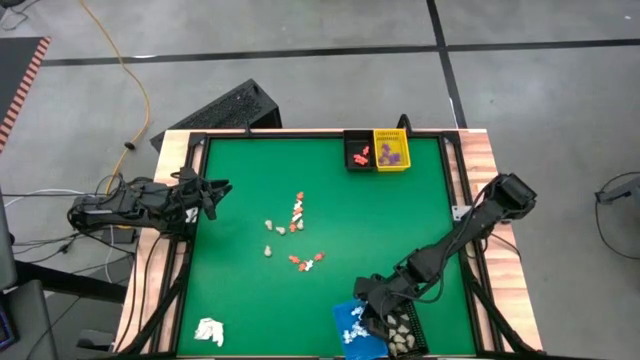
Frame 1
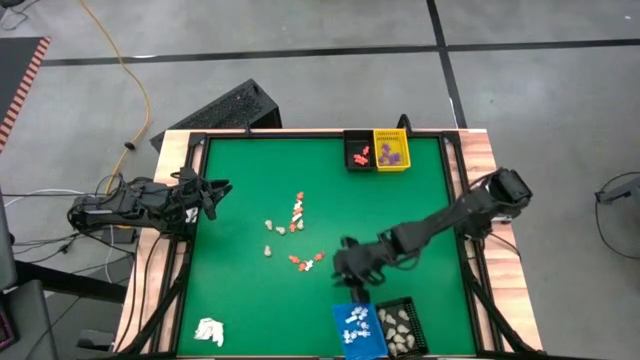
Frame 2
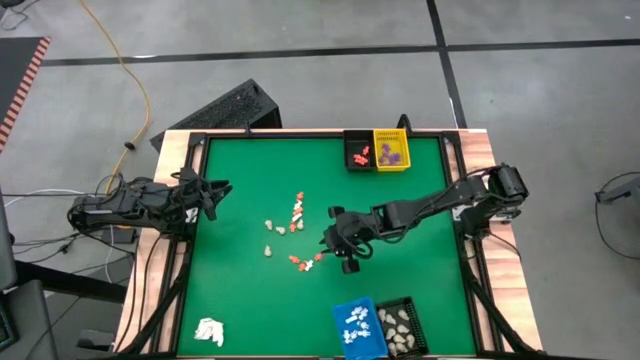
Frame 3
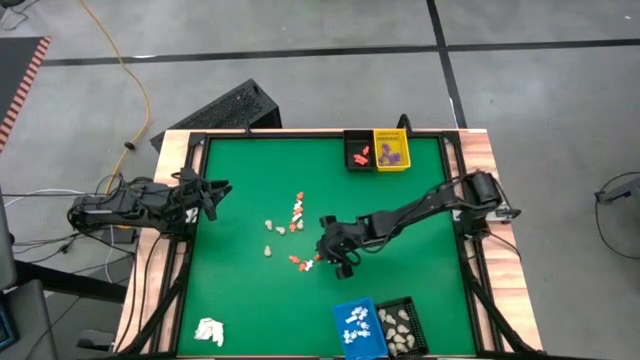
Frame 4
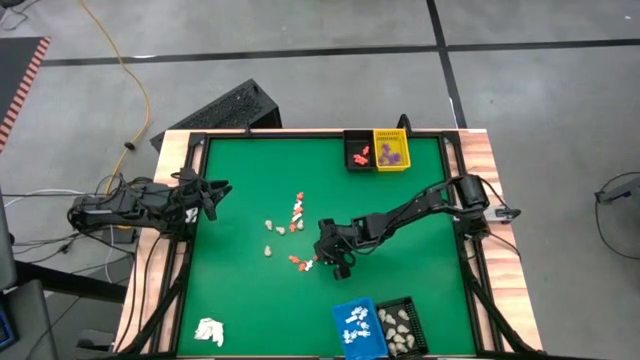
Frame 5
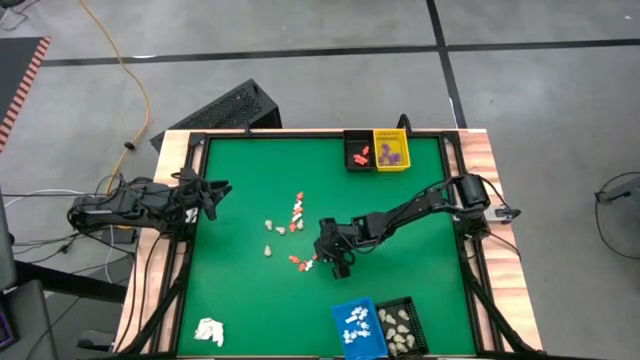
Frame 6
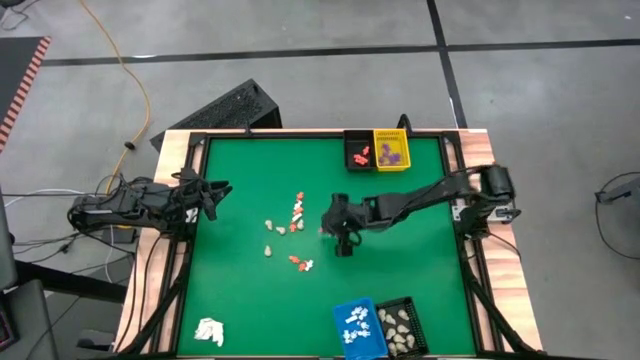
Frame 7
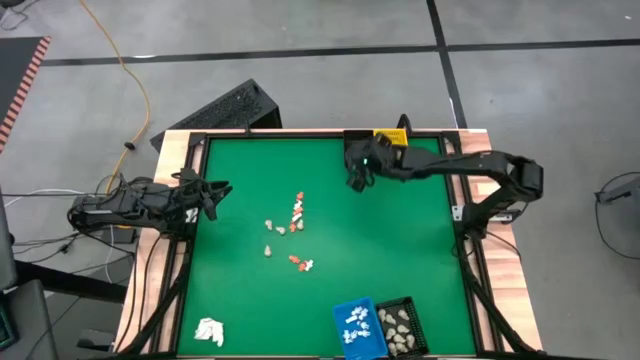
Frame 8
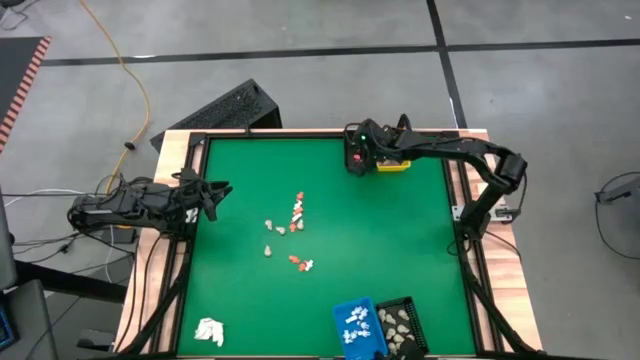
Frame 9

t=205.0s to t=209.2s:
Task: Sort Halloween decoration
Put the orange skeleton toy into the top black basket

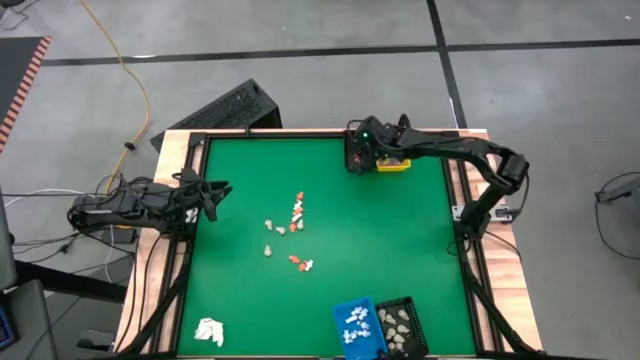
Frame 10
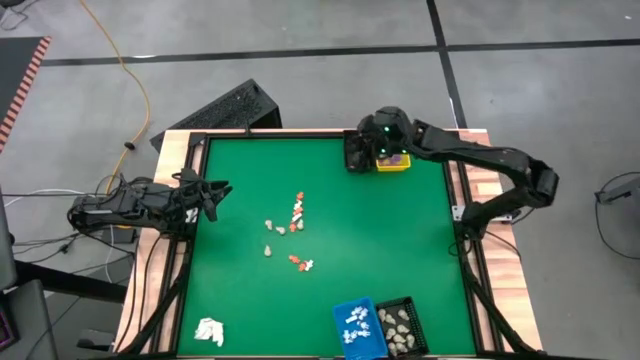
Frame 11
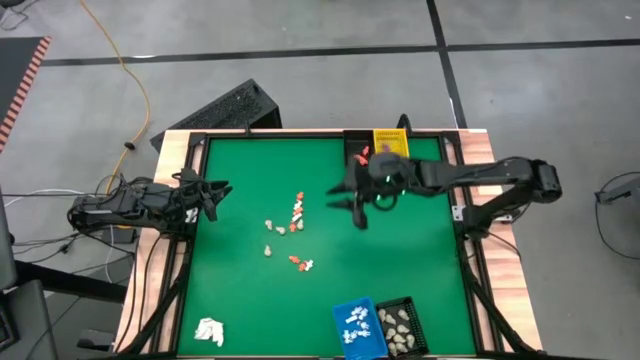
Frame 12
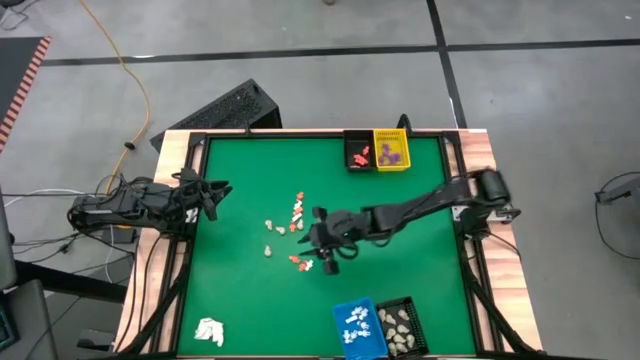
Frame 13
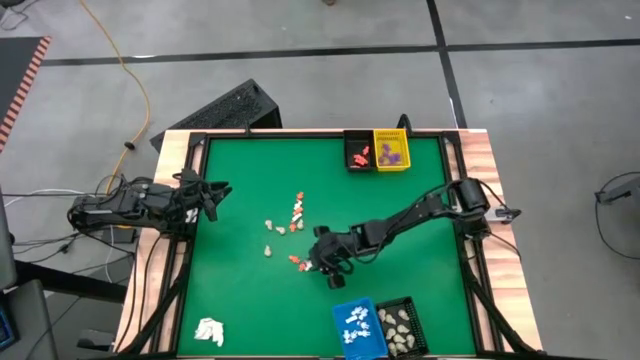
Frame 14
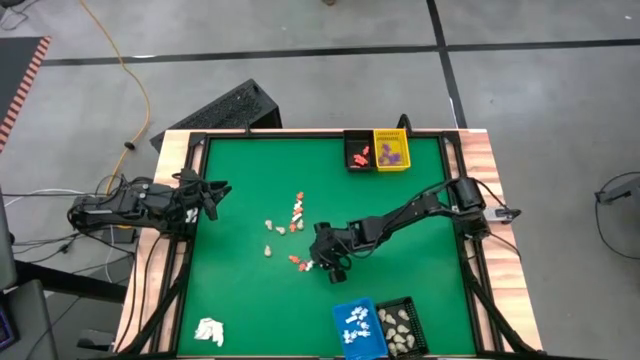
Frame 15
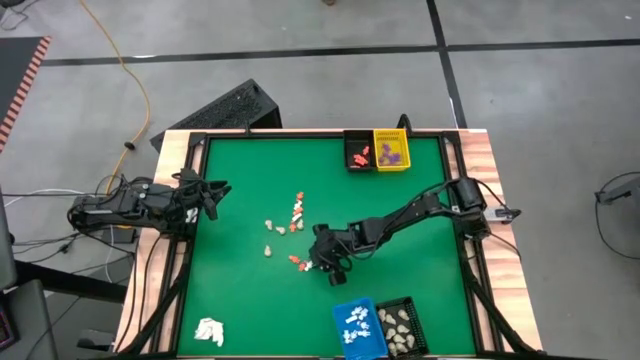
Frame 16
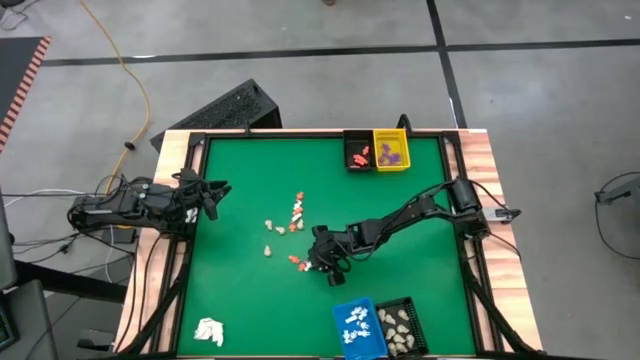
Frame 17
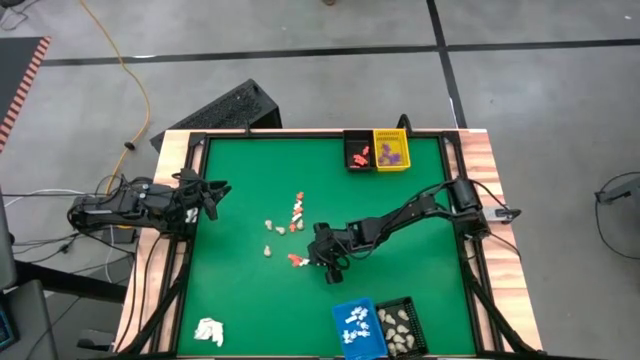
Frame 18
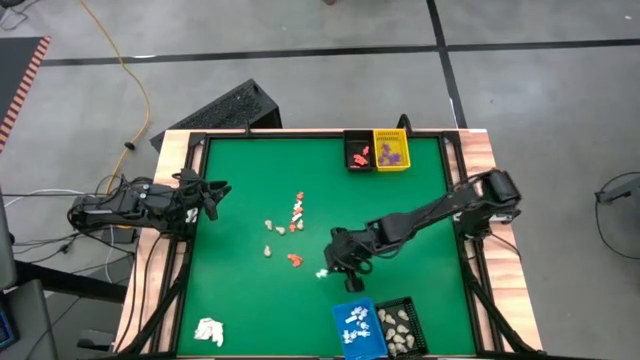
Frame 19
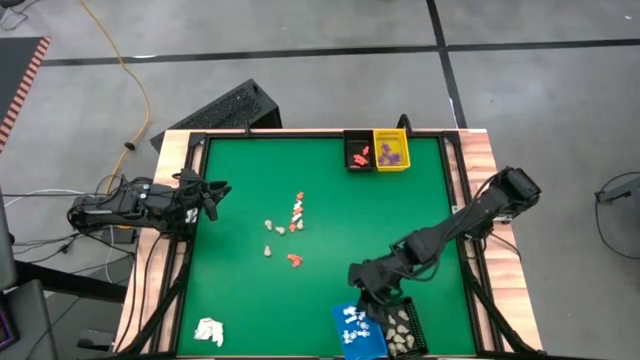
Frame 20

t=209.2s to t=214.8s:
Put the white skeleton toy into the blue basket

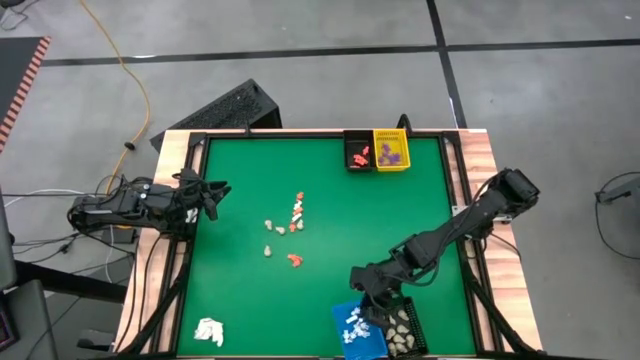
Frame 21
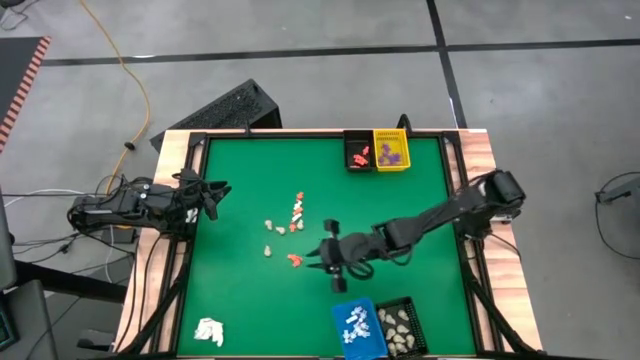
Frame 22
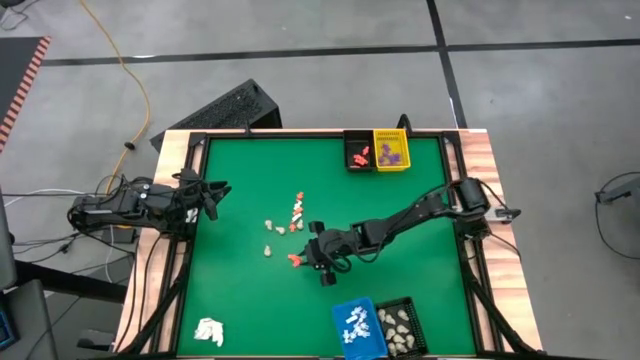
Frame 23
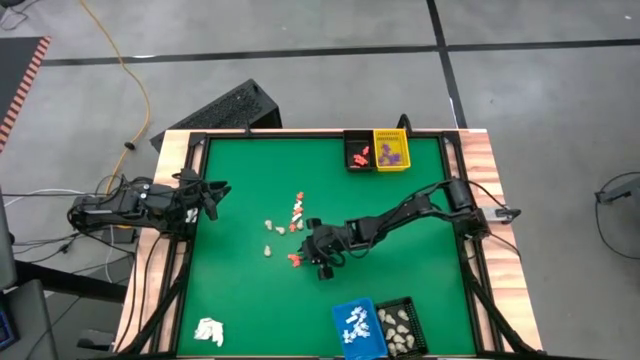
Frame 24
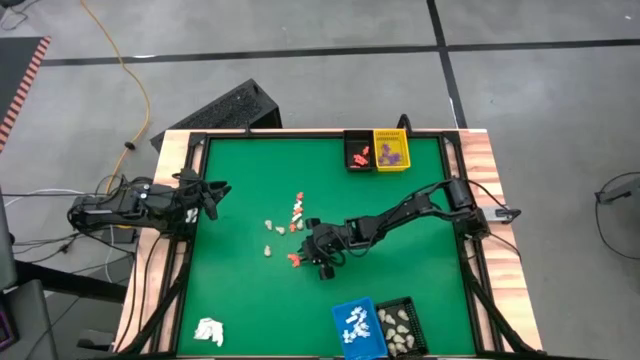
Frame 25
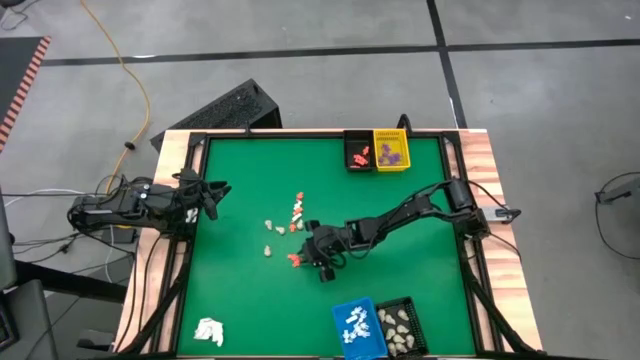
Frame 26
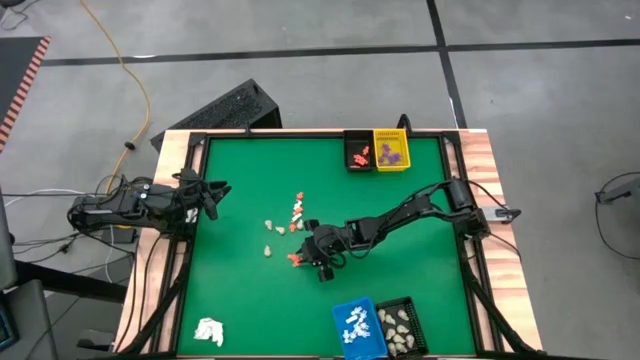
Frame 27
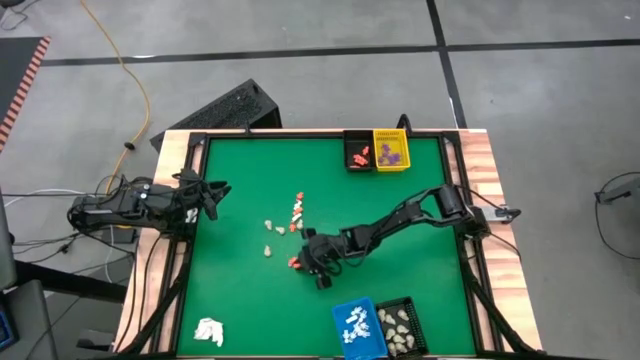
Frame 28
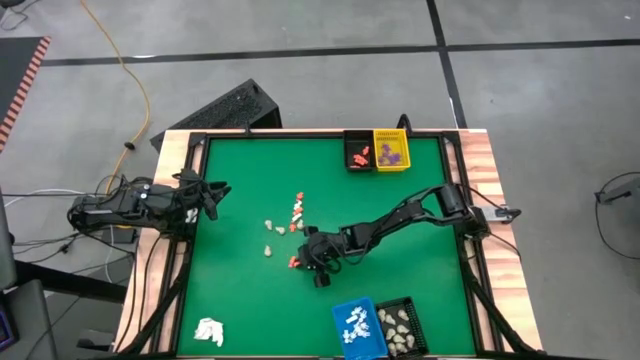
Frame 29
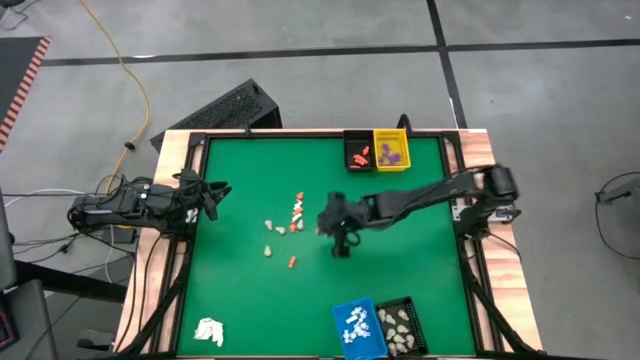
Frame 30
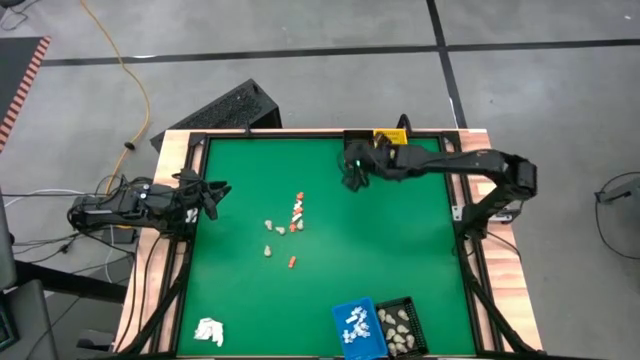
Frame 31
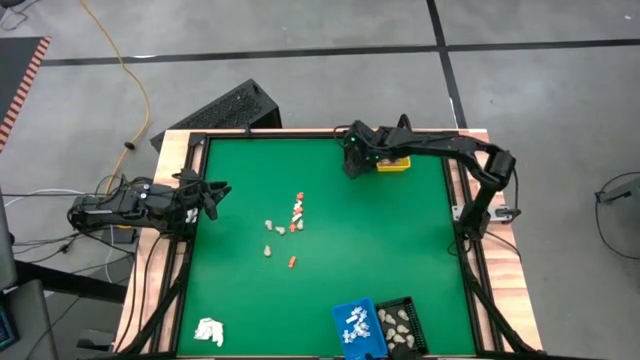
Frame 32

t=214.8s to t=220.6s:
Put the orange skeleton toy into the top black basket

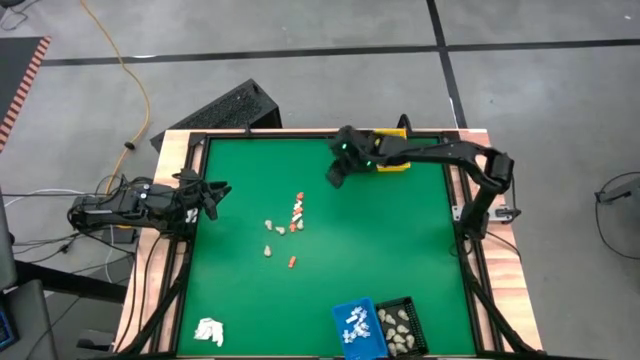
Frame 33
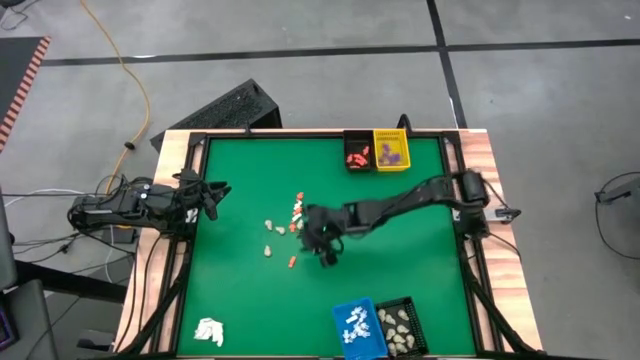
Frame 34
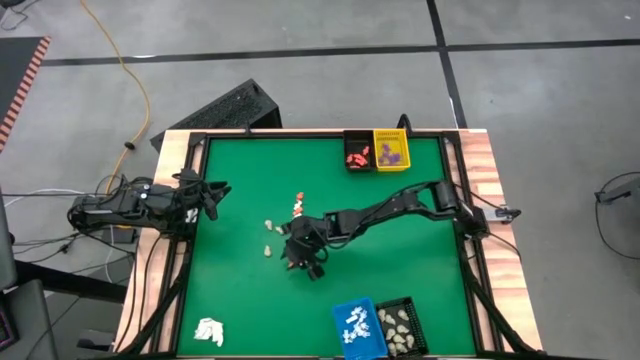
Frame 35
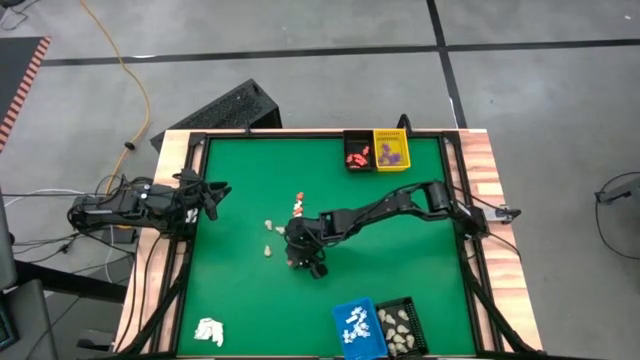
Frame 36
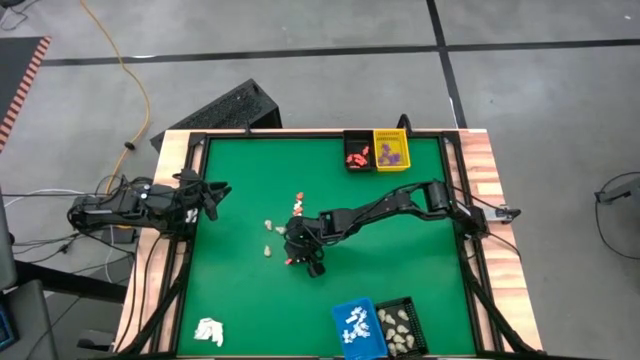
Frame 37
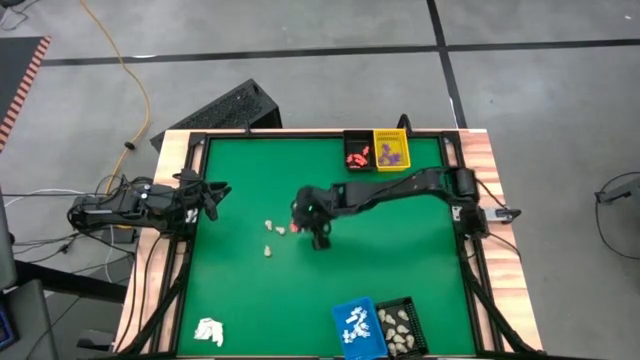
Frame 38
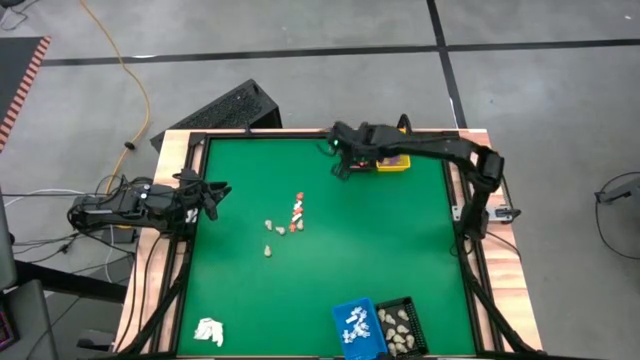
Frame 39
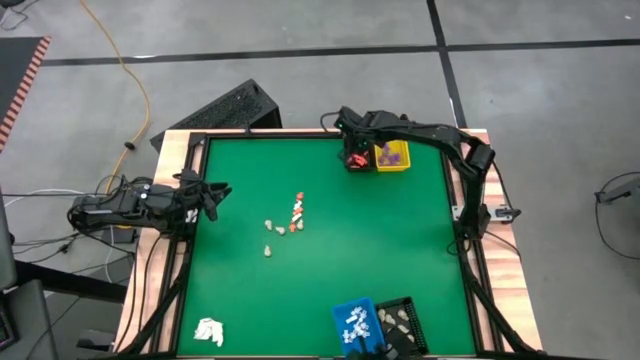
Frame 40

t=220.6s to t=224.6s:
Put the orange skeleton toy into the top black basket

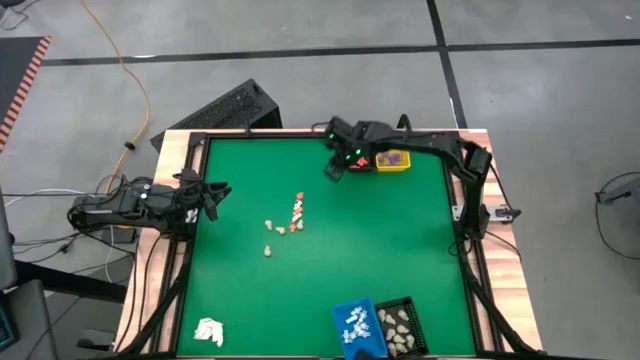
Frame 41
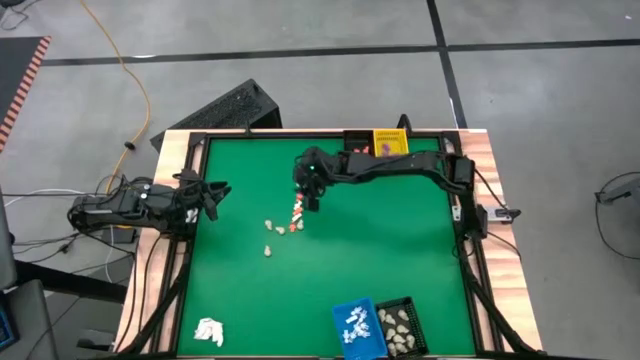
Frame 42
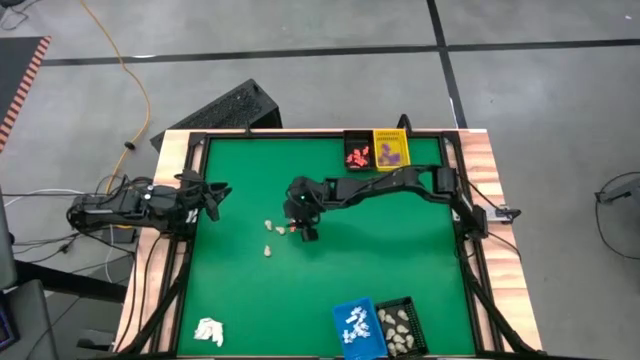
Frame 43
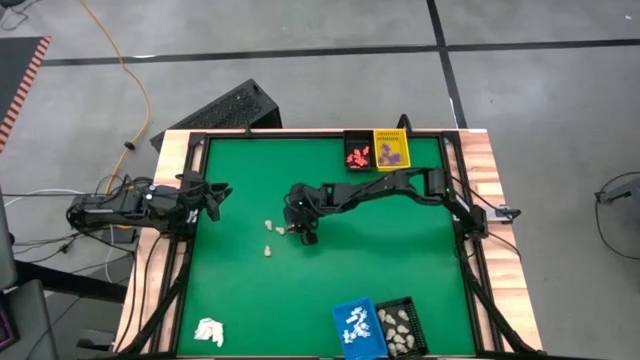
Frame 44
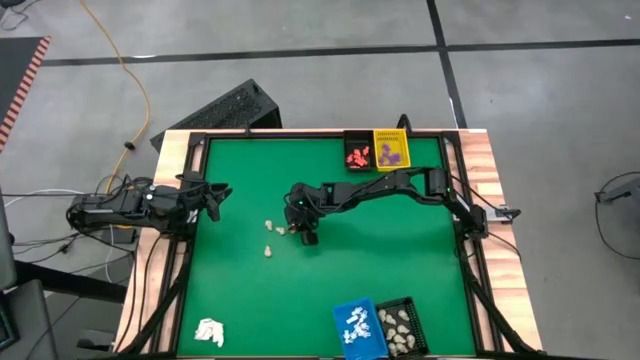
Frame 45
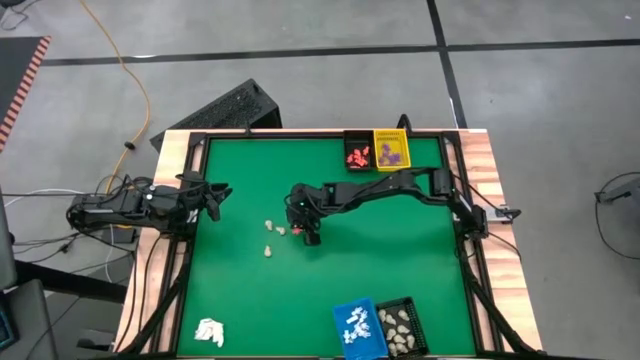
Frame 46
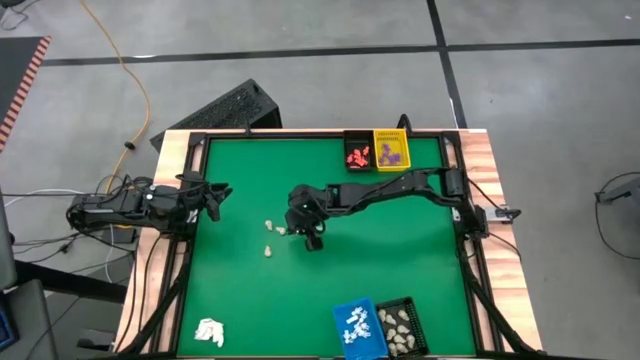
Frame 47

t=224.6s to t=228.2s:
Put the orange skeleton toy into the top black basket
